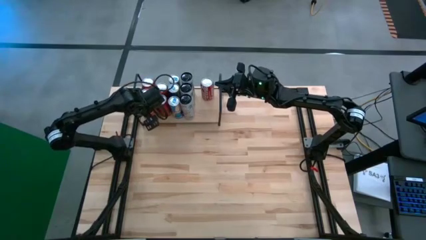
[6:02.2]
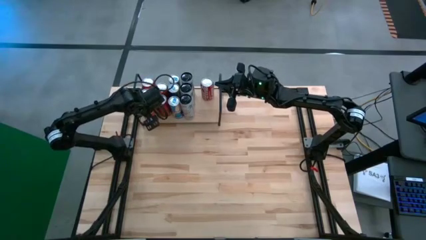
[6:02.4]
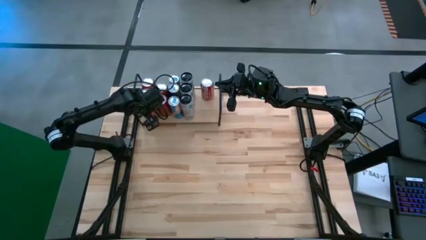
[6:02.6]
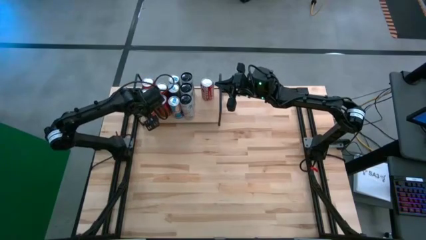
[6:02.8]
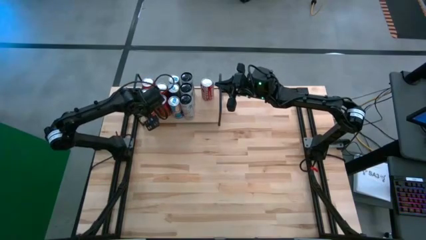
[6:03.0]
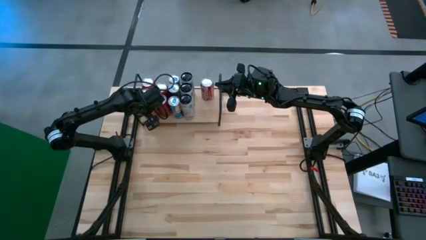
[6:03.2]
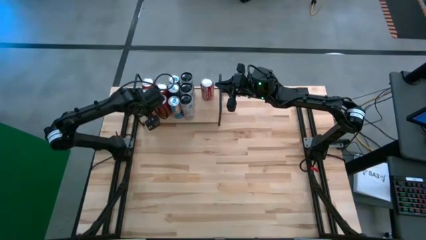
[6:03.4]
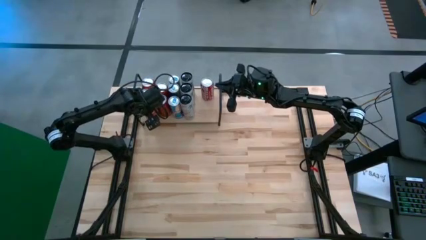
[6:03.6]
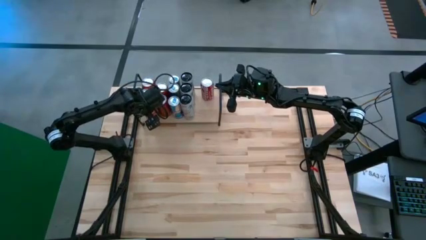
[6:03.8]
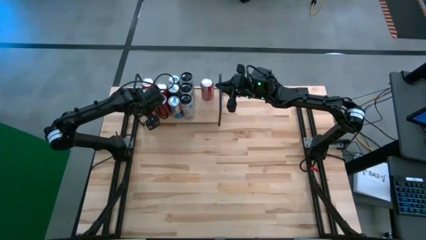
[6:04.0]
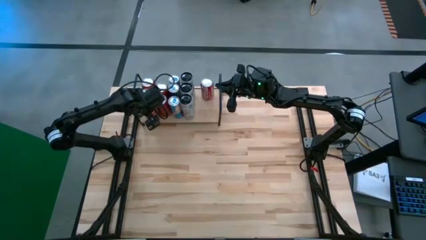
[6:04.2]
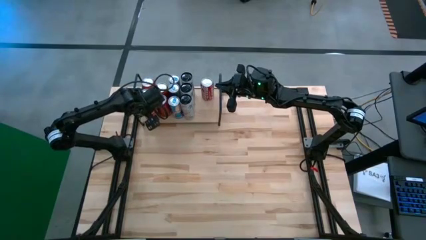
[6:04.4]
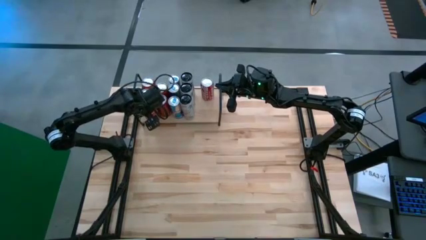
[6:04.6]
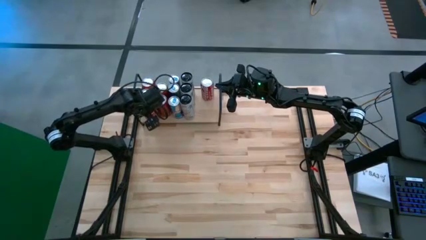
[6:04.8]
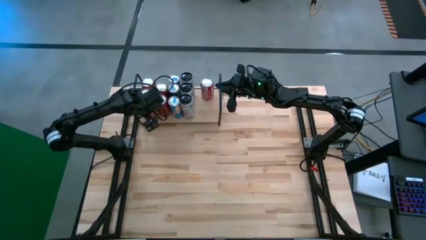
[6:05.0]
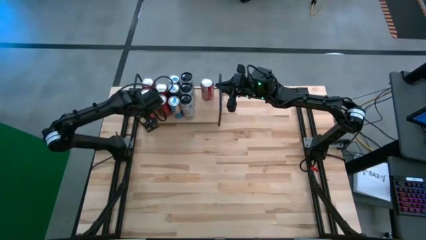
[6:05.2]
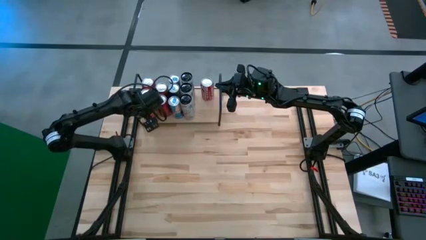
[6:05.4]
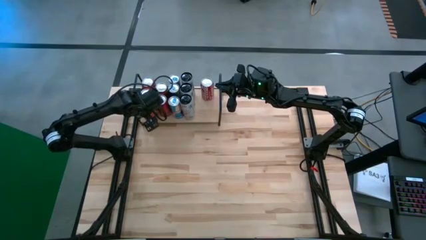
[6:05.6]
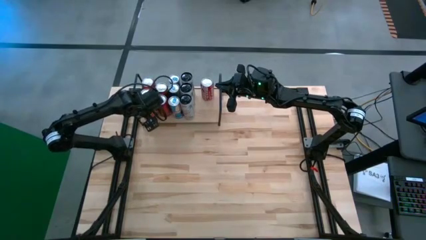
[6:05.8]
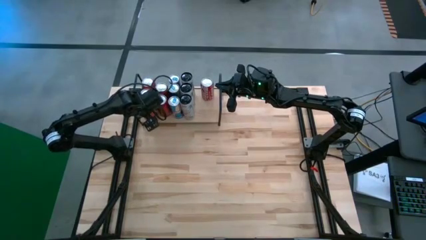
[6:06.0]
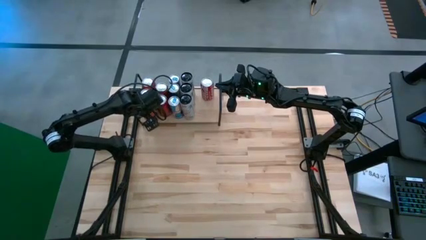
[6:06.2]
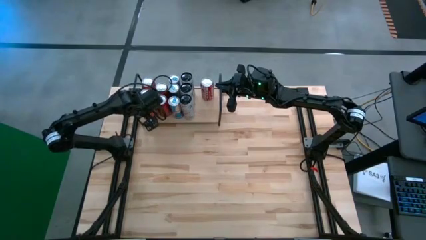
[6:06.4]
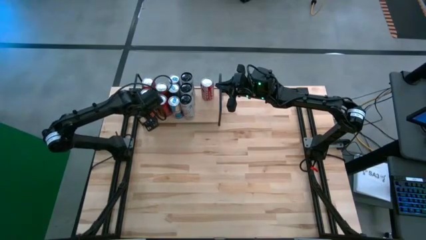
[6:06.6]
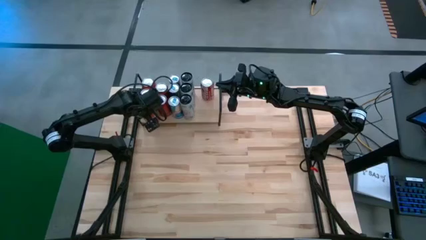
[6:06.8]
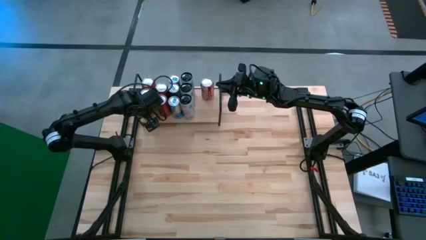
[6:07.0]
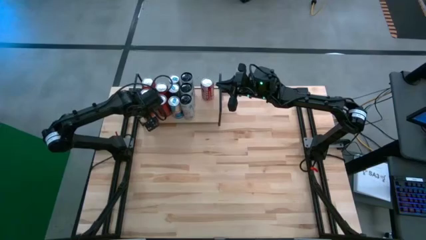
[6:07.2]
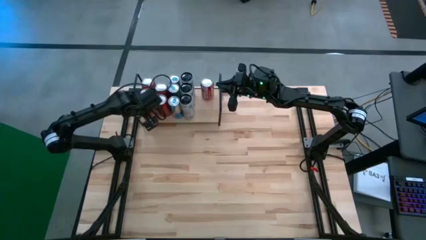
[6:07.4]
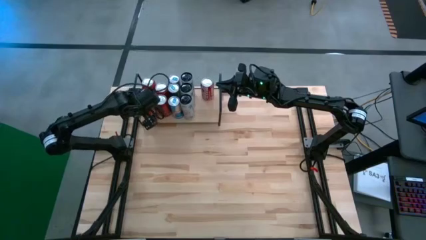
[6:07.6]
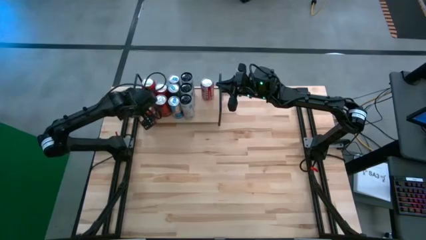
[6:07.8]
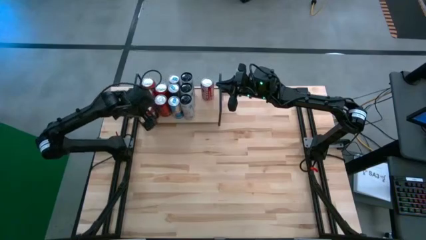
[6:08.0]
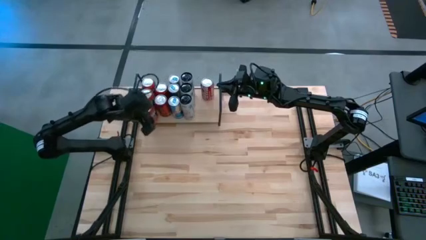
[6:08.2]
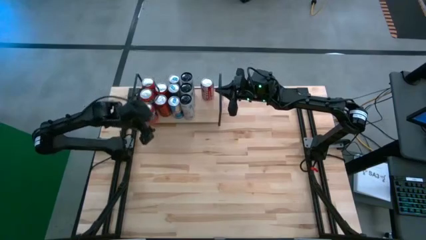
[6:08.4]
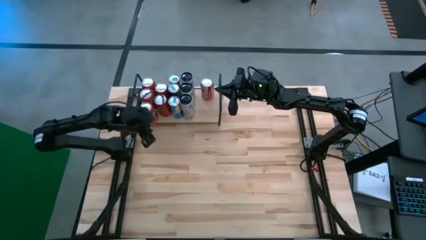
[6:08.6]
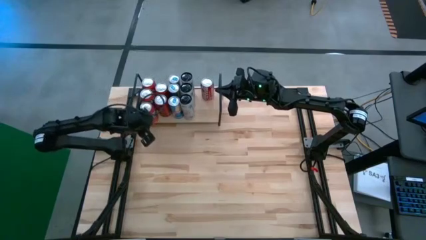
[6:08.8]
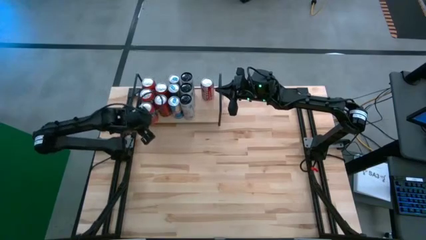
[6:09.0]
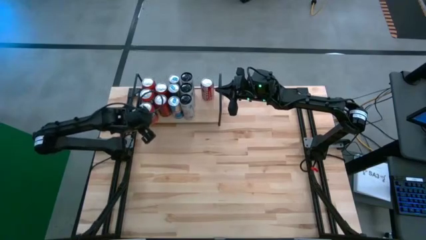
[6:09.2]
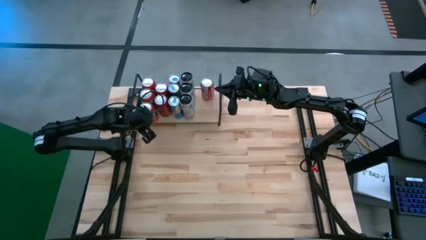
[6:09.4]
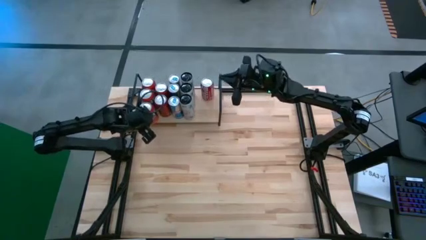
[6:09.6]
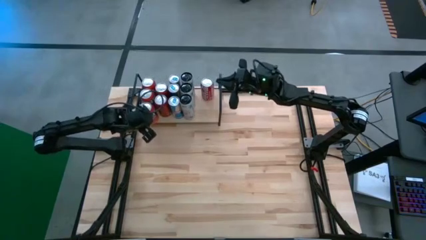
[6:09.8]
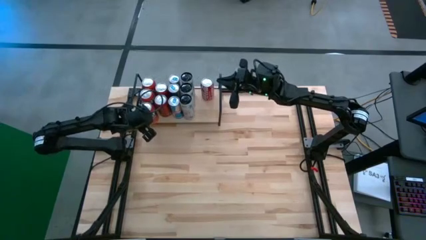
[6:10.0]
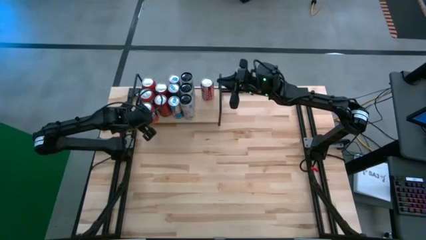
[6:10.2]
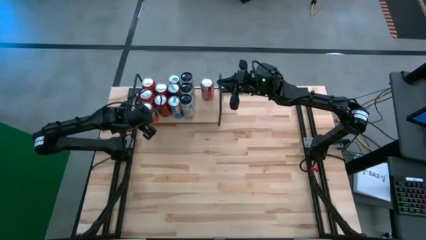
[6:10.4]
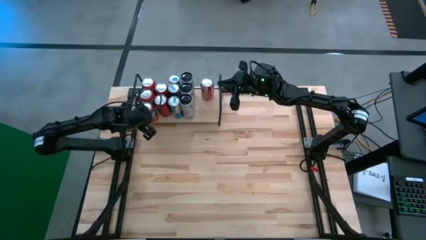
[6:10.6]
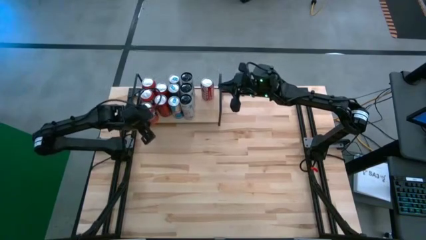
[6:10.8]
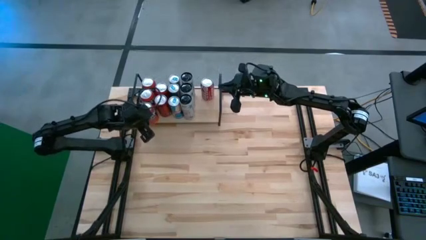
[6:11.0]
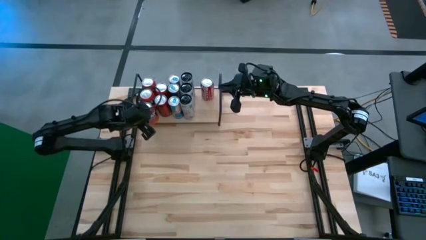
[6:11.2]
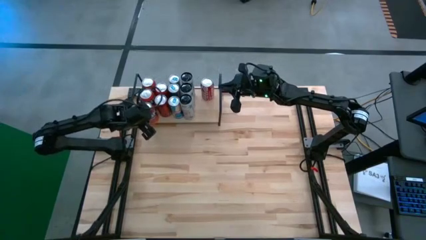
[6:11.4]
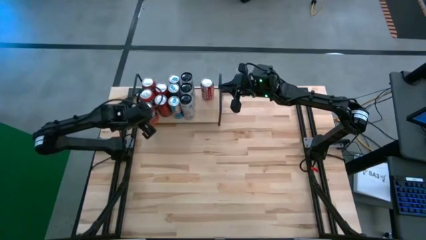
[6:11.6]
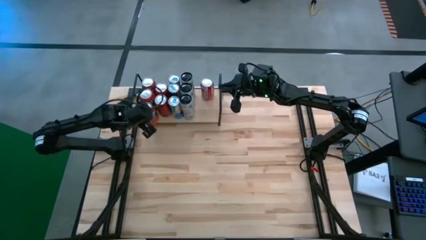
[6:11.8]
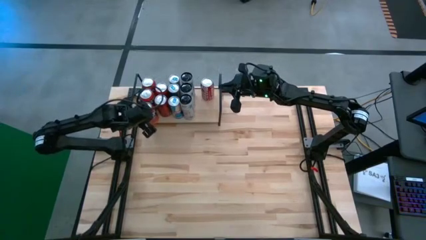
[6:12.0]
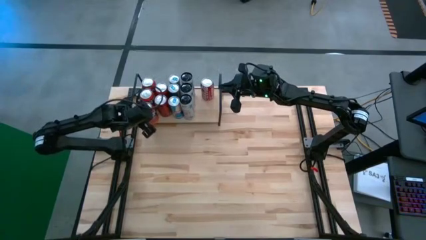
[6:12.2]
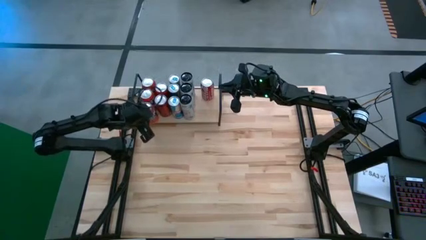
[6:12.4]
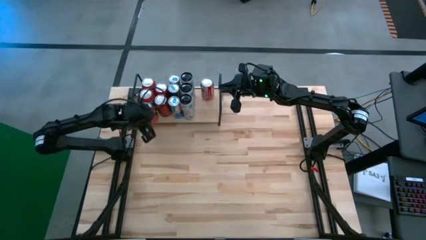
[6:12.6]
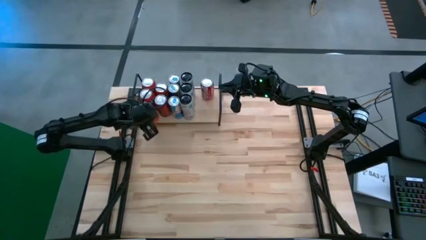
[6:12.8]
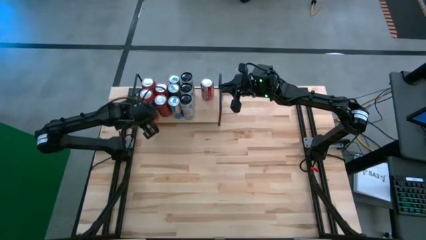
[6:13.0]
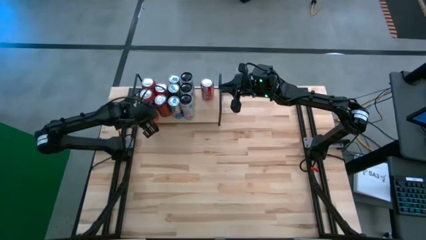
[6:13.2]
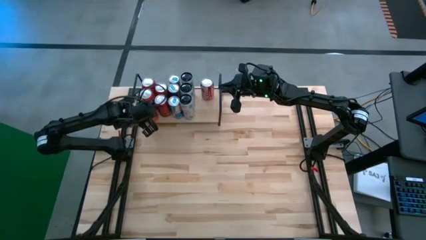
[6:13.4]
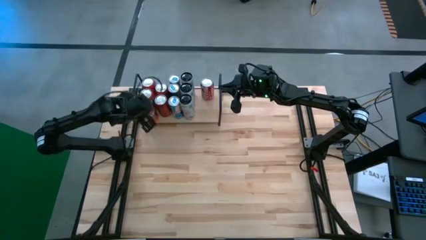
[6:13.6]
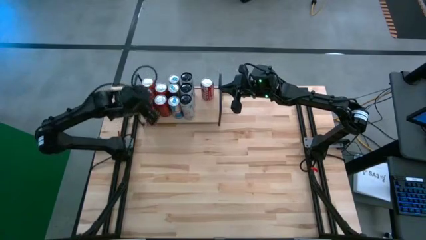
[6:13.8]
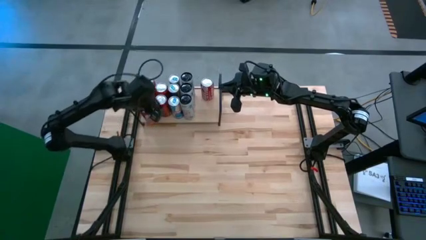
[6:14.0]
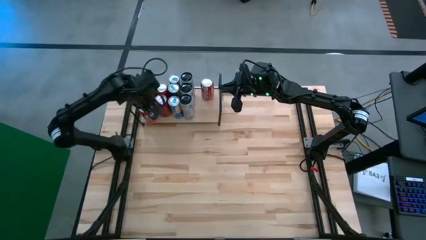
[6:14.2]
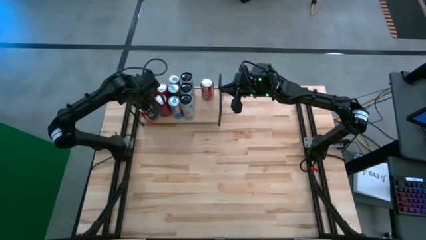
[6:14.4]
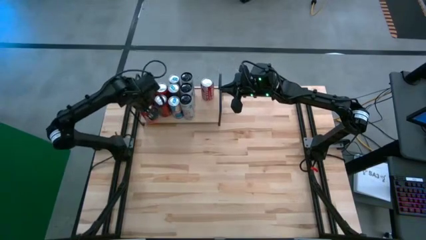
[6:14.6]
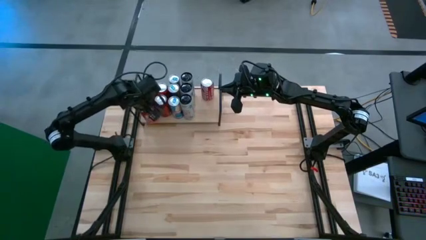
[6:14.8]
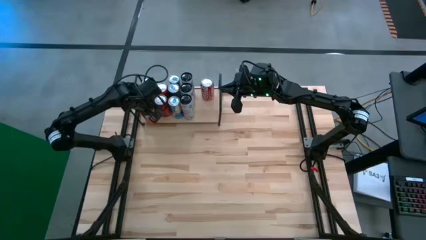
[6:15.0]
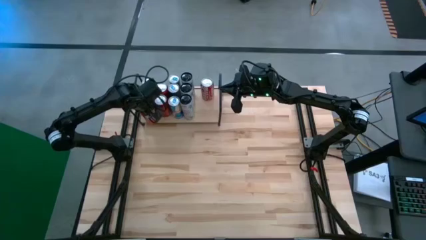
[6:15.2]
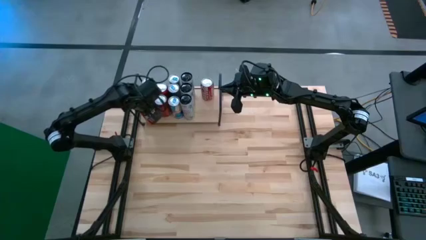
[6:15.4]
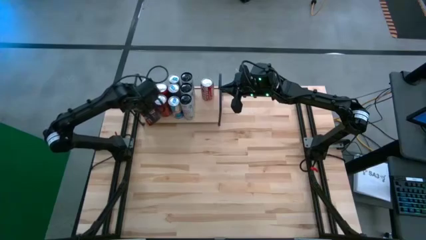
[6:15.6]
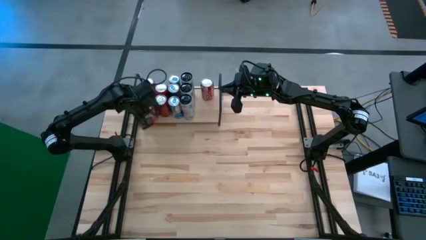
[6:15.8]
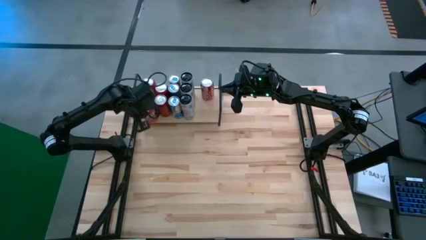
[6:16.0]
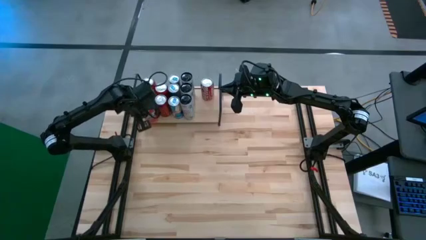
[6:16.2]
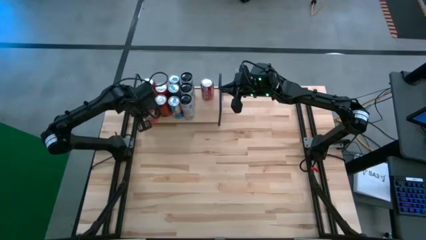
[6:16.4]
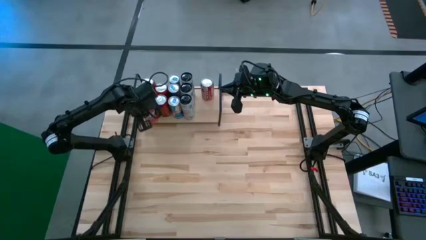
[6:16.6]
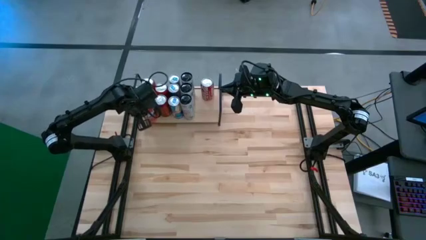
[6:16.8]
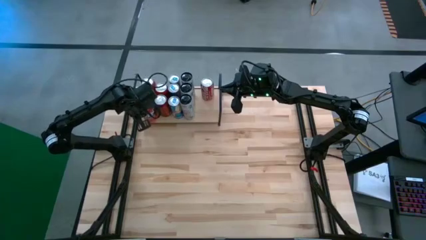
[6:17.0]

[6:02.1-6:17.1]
Task: Place canned beverage on shelf
Put the orange soda can on the shelf aligned with the other orange soda cans
